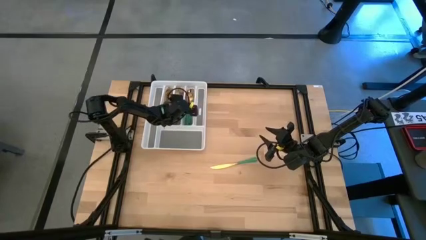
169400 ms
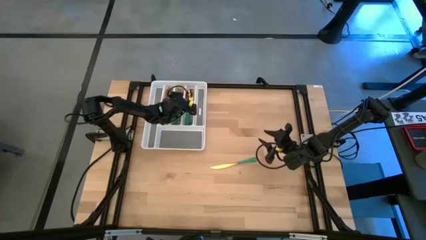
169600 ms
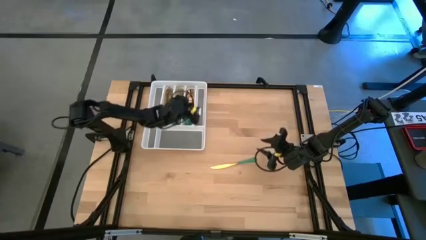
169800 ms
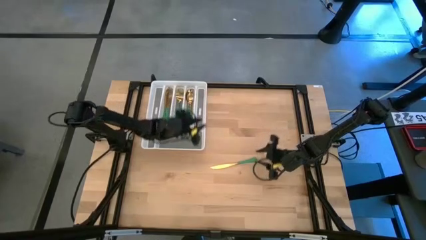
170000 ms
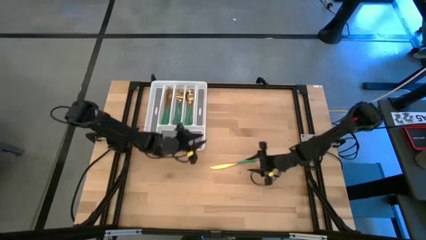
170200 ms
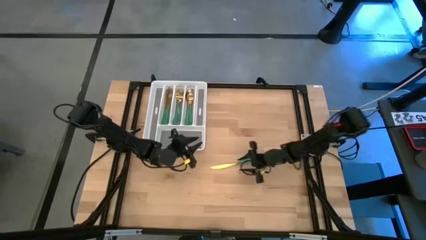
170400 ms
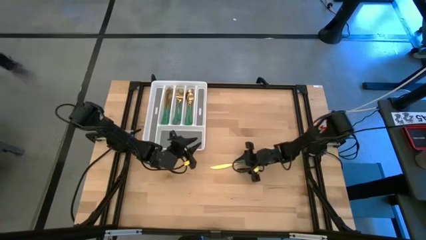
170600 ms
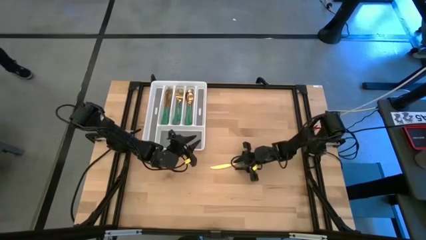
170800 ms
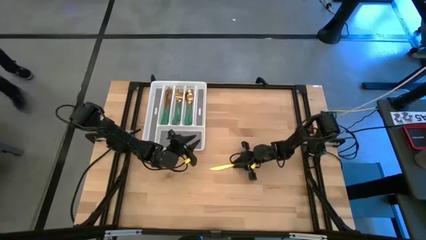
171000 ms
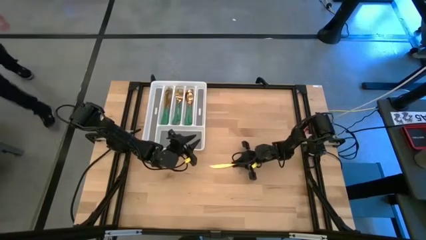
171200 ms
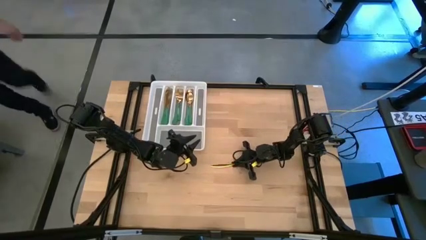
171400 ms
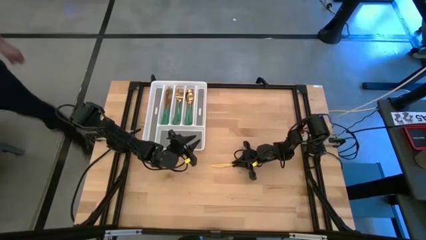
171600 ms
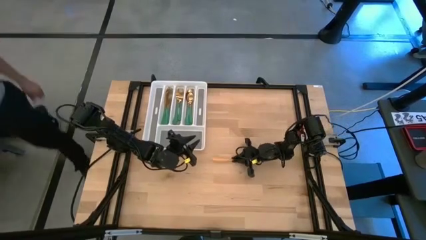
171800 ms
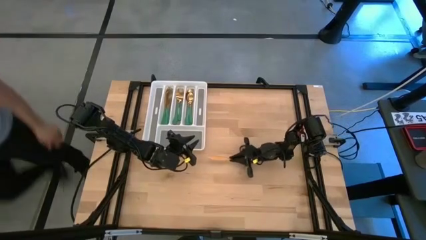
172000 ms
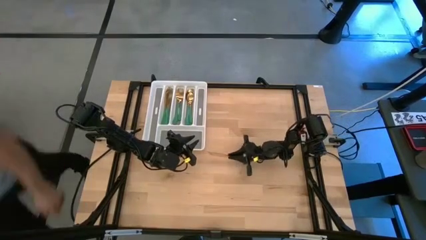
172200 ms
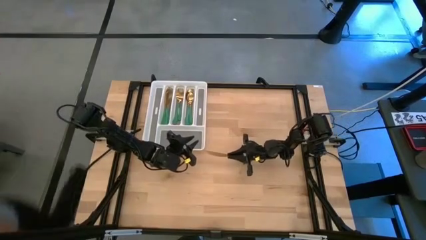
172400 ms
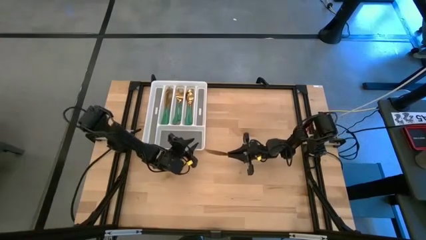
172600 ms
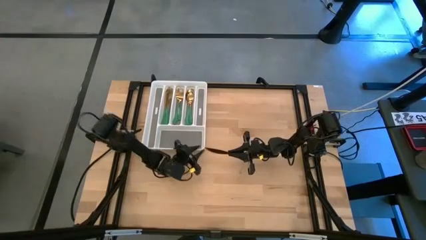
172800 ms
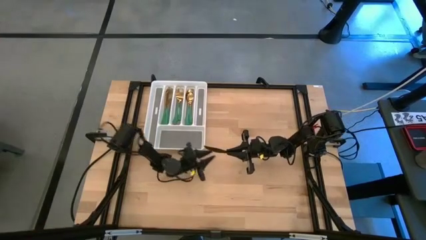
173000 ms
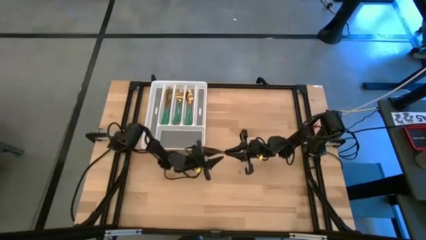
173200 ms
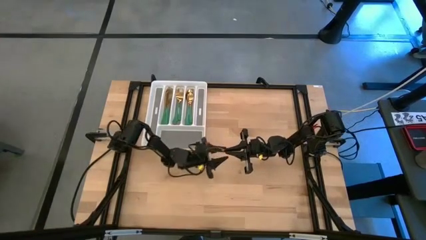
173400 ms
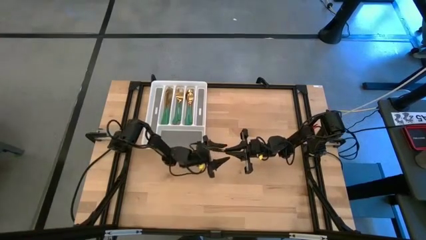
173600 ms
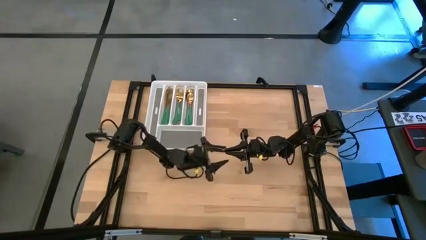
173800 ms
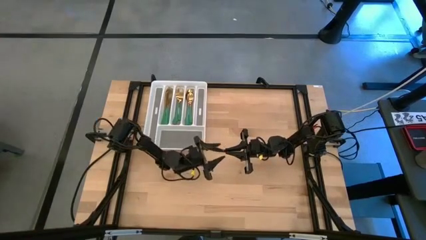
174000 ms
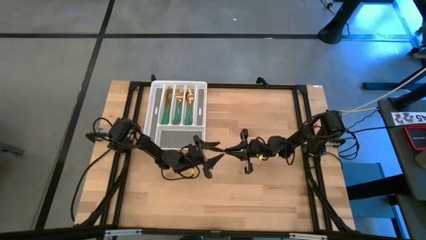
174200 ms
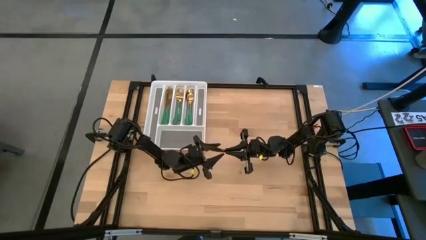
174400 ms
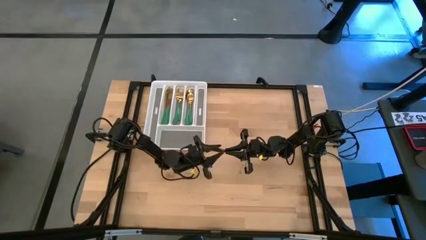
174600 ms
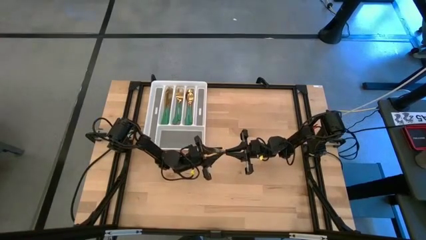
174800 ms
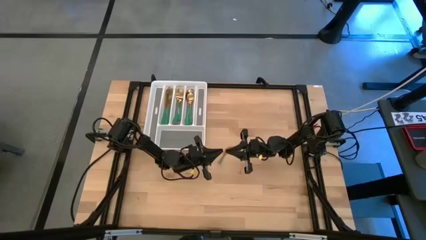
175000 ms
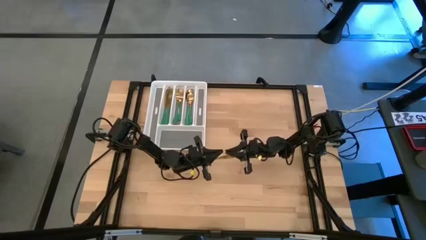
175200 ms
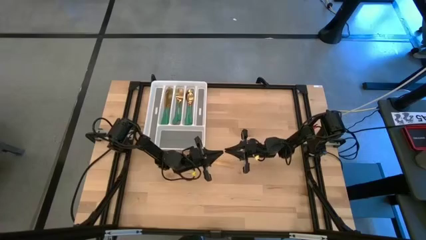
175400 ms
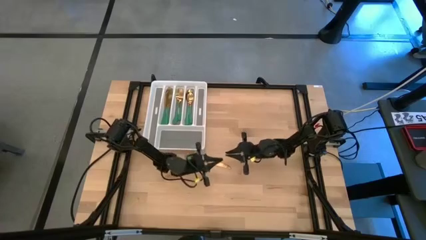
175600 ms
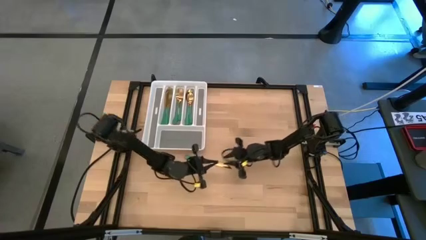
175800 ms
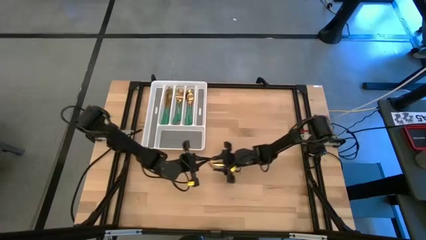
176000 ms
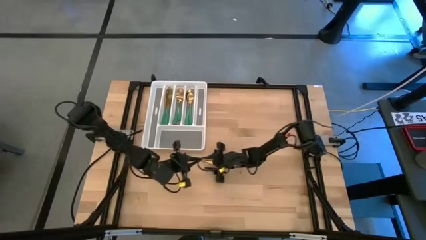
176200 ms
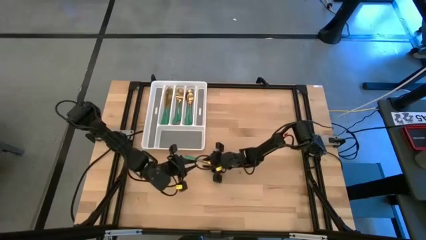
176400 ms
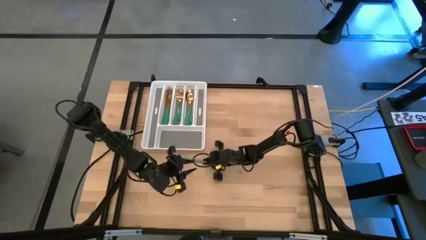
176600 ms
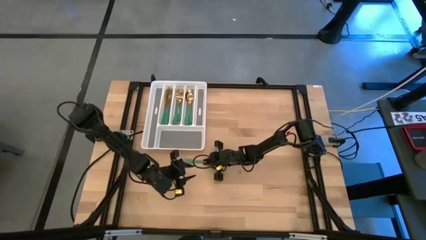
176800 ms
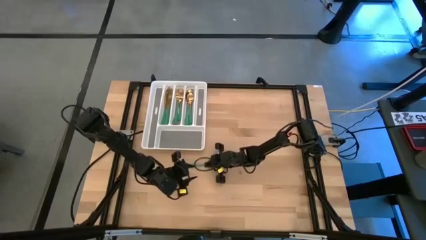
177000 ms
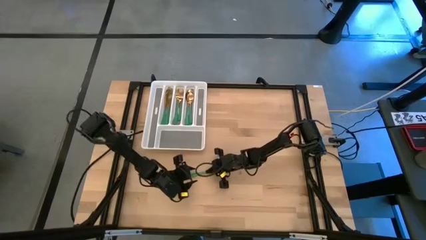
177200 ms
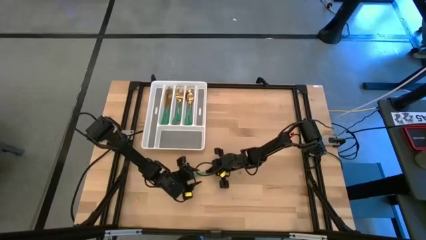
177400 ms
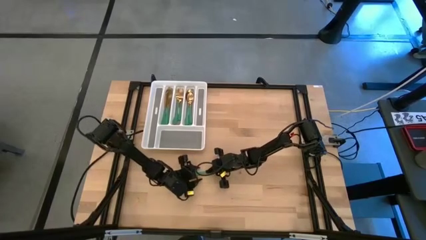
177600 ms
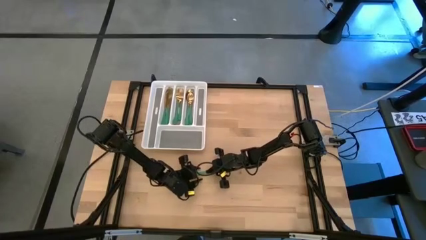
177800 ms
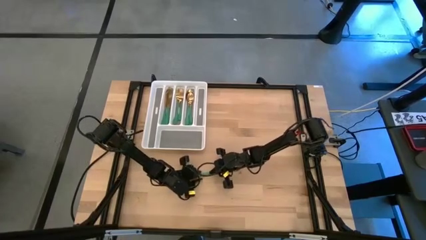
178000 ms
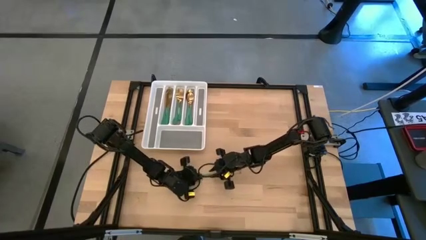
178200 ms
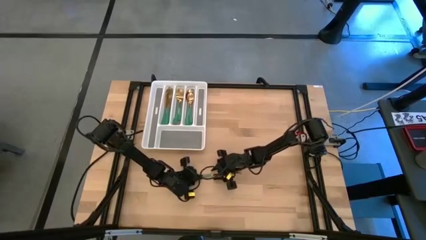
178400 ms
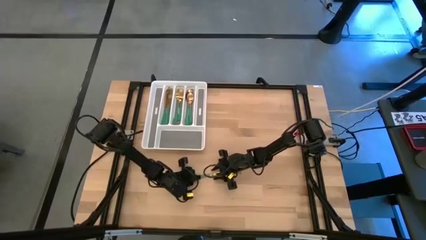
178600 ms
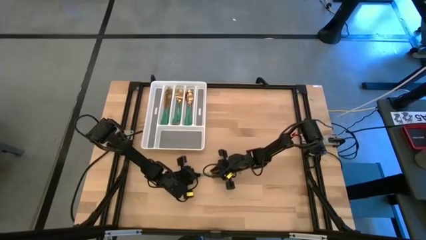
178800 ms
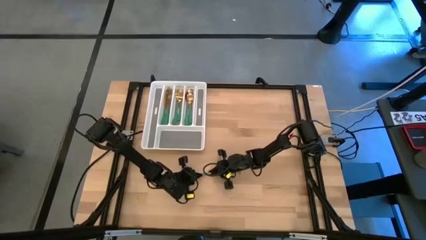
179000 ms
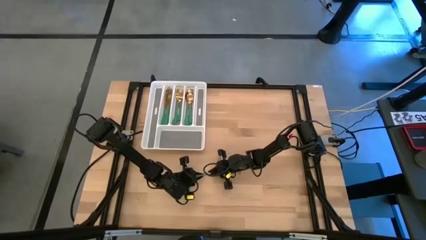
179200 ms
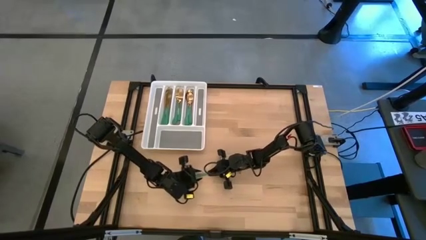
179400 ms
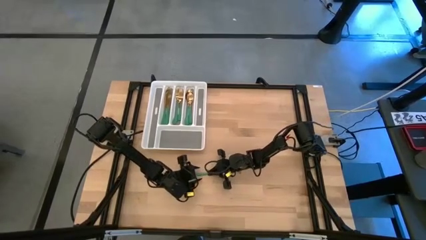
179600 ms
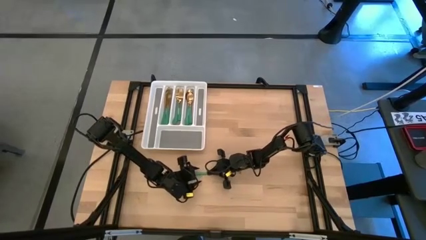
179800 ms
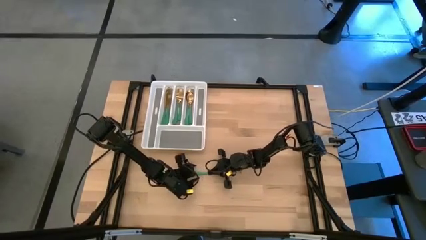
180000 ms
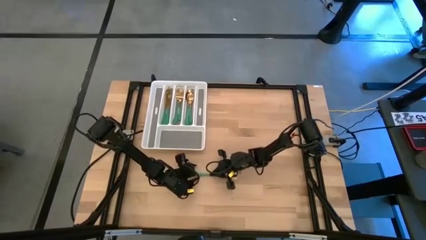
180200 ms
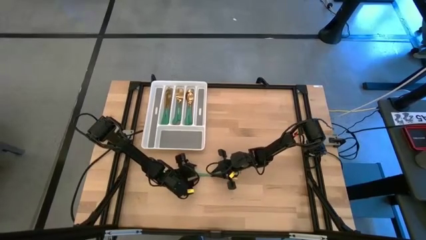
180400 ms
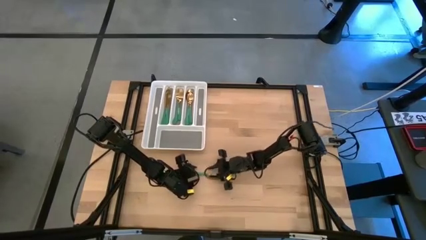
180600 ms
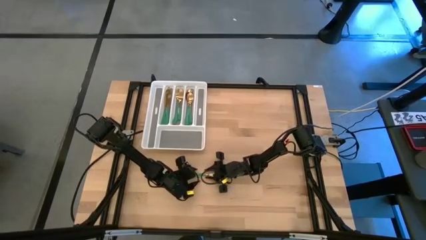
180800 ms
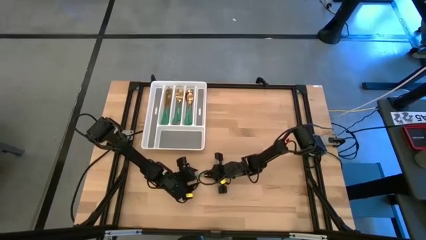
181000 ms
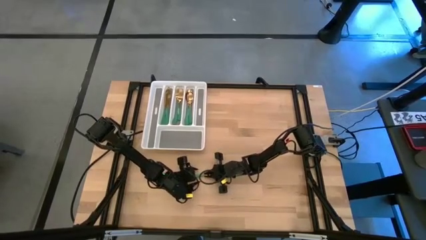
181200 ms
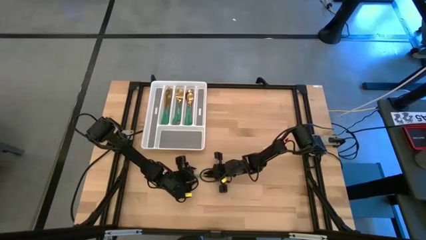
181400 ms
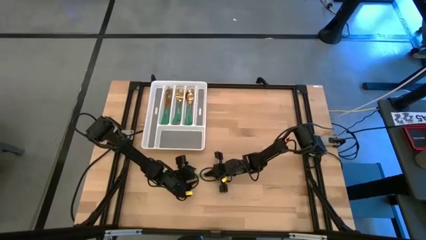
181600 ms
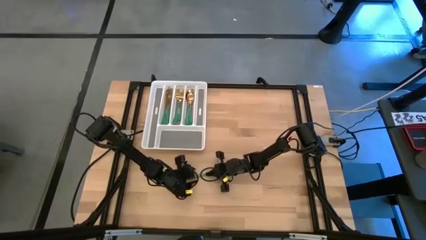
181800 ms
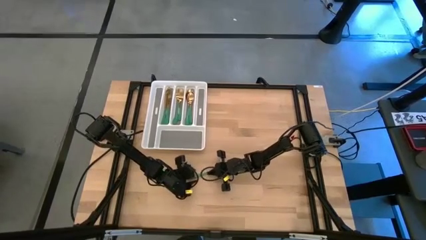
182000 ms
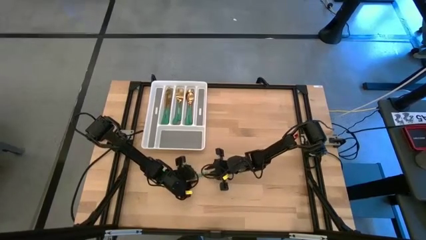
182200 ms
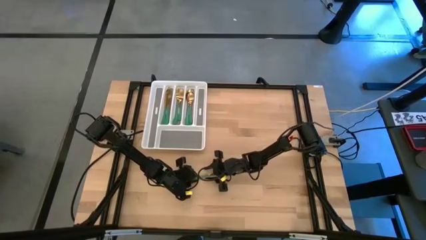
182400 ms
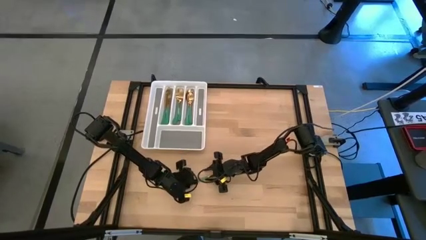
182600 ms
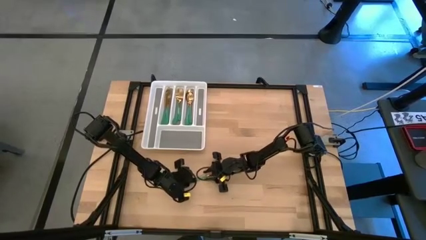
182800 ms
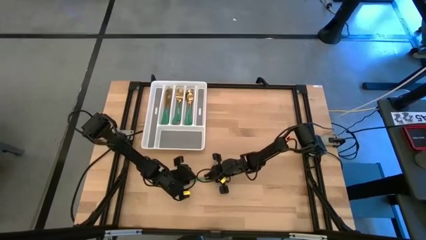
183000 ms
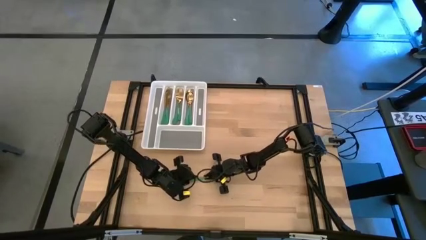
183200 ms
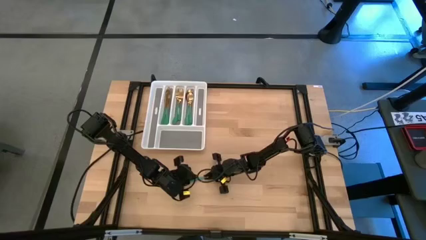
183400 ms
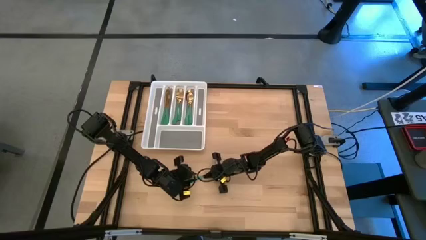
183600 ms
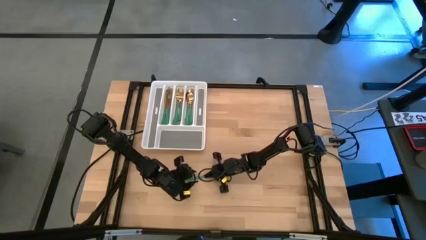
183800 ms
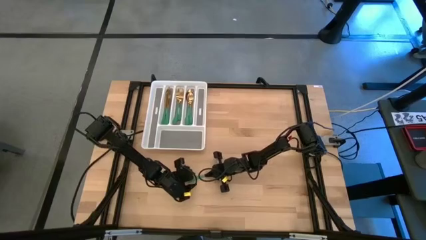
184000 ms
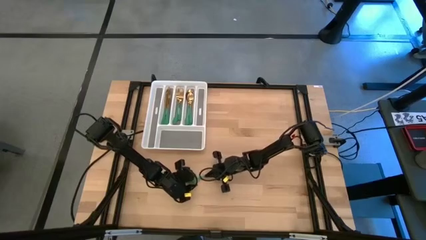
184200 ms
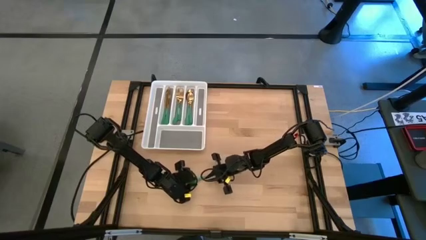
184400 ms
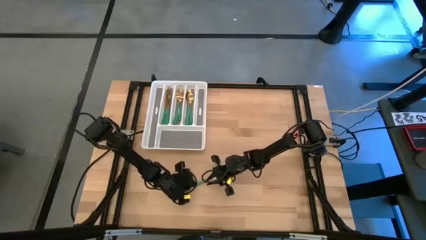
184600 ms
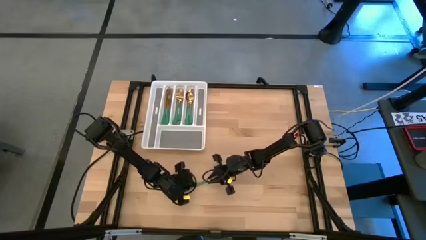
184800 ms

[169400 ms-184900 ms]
Task: Sort silverware
Put the green knife into the white cutlery tray
